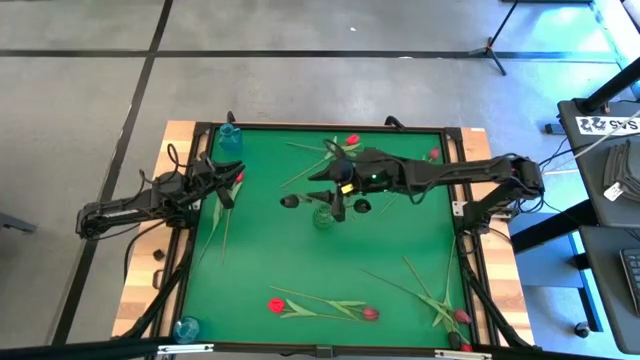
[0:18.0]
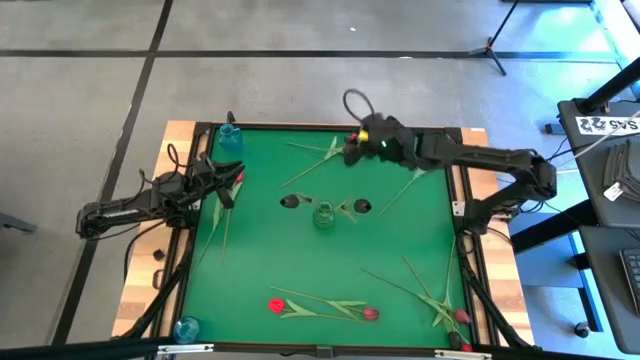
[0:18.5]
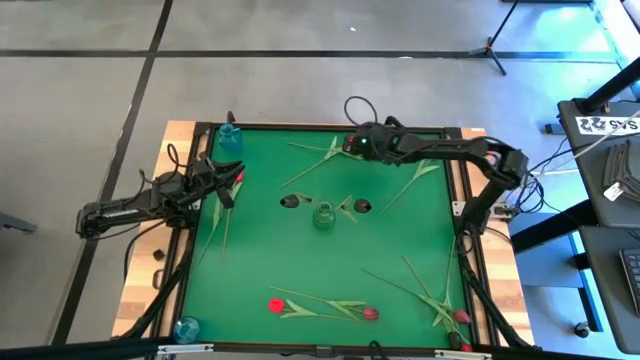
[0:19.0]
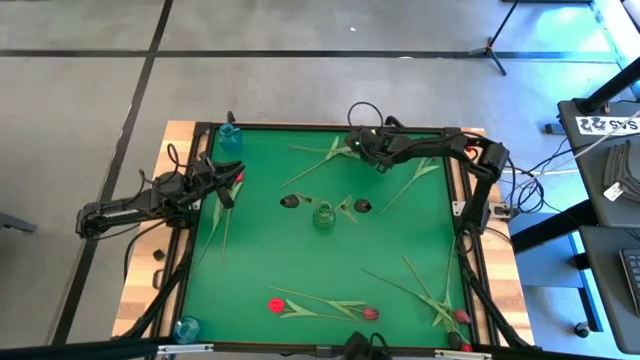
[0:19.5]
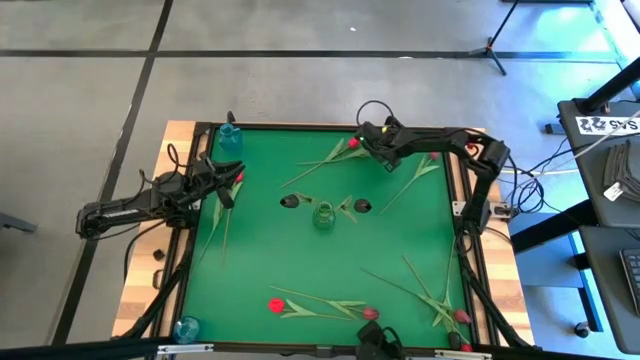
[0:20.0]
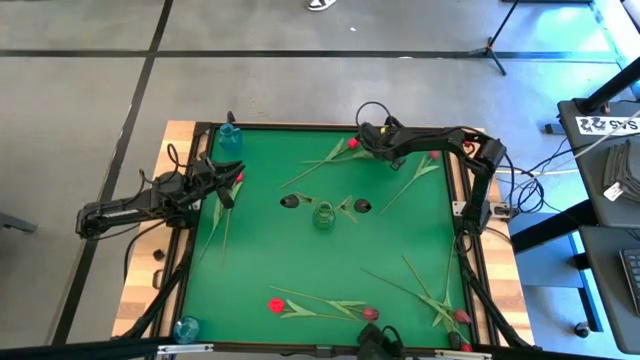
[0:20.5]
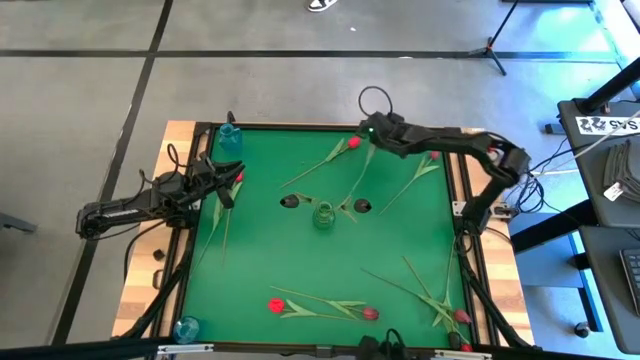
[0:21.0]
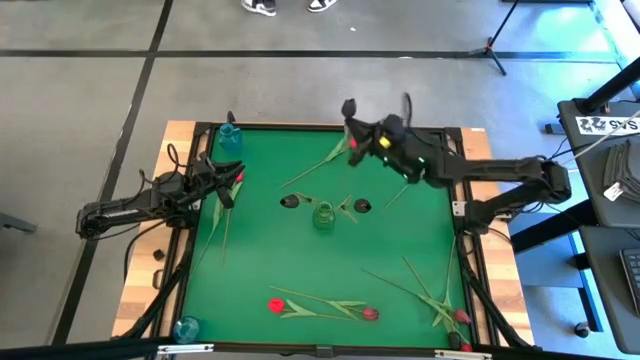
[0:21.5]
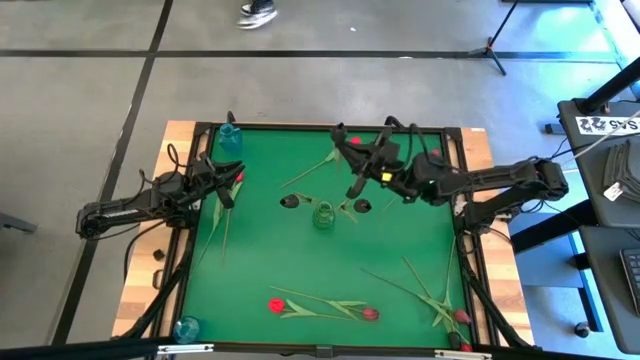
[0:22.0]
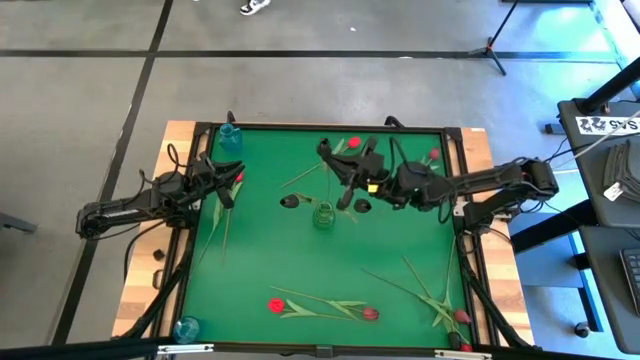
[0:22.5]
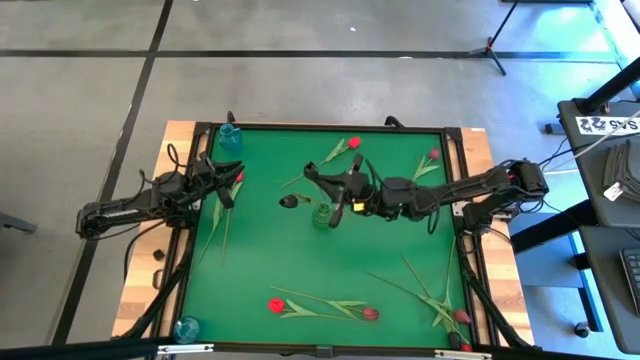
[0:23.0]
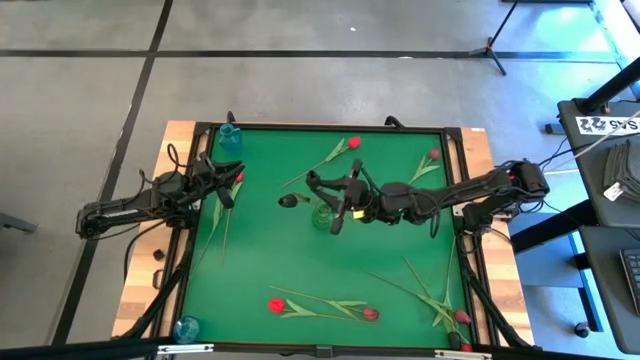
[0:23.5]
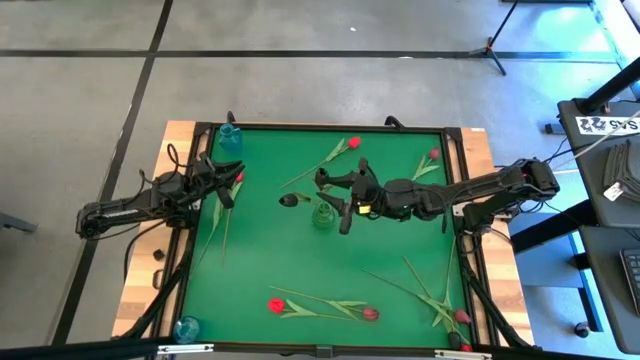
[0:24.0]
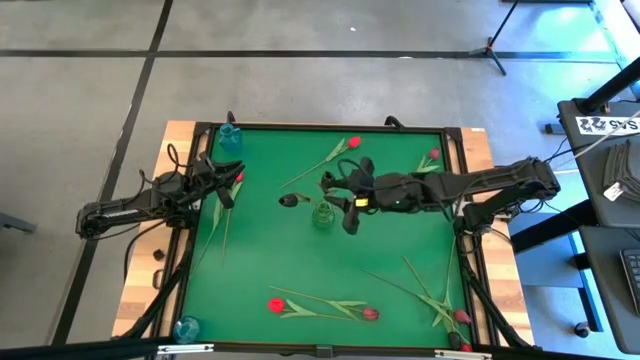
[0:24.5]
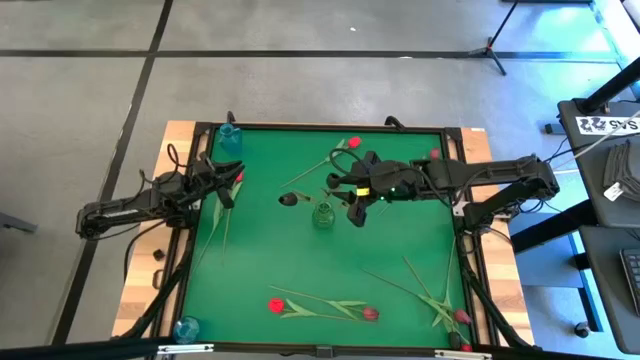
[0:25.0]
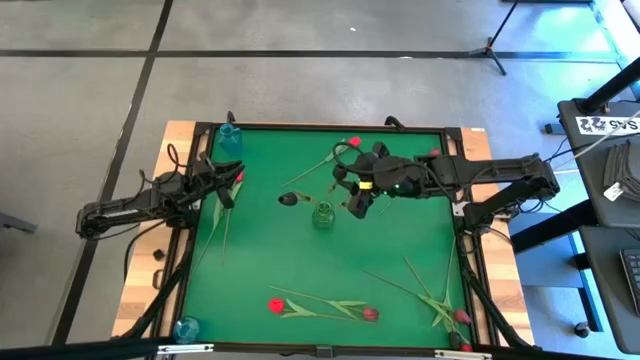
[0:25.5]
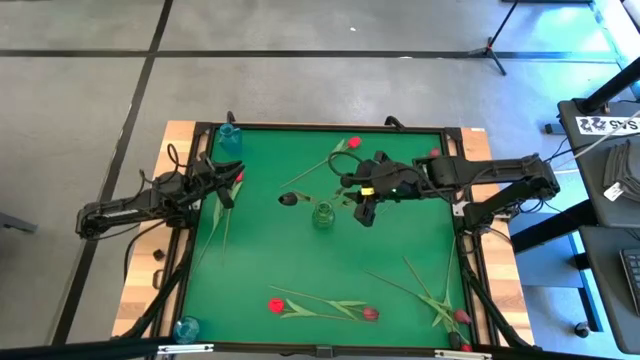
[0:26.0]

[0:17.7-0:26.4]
Task: Sort flowers into vase by color
Put the black tulip into the green vase

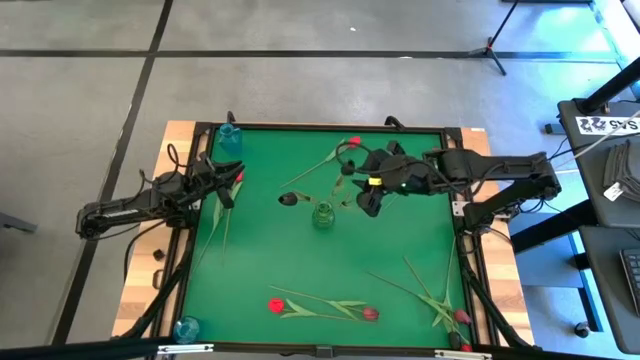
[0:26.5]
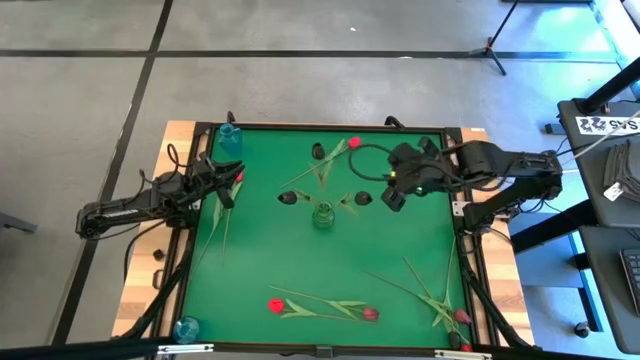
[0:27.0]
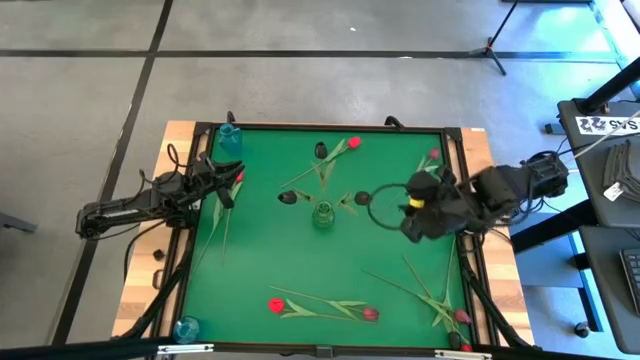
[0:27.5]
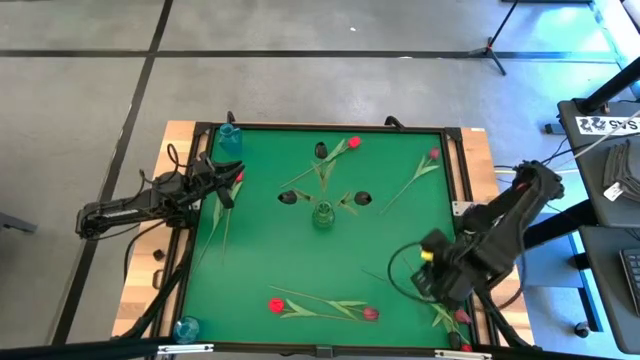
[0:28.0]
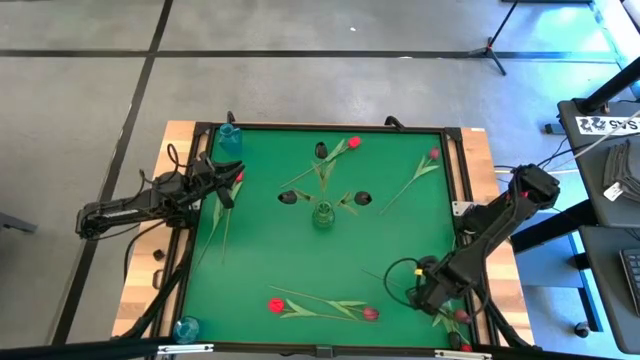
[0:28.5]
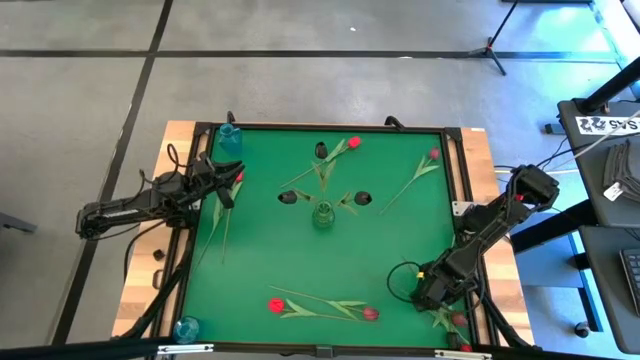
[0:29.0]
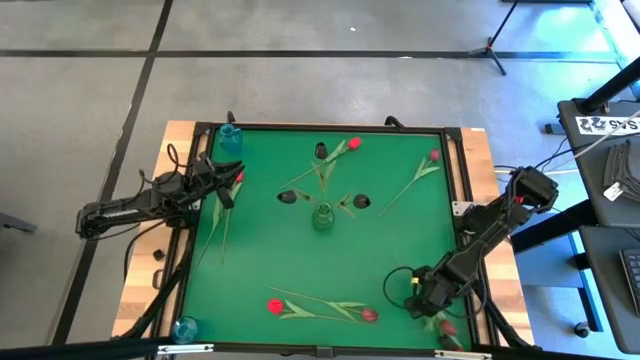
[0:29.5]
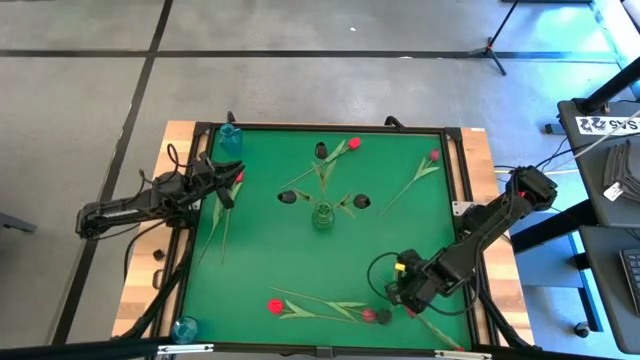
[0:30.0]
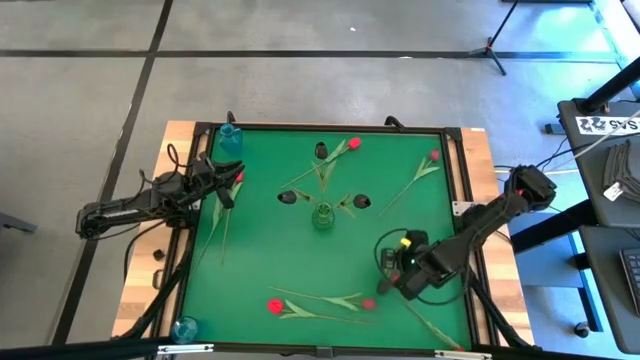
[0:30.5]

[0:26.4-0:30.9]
Put the black tulip into the green vase

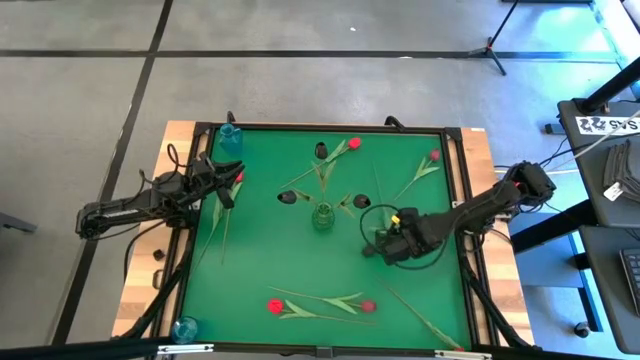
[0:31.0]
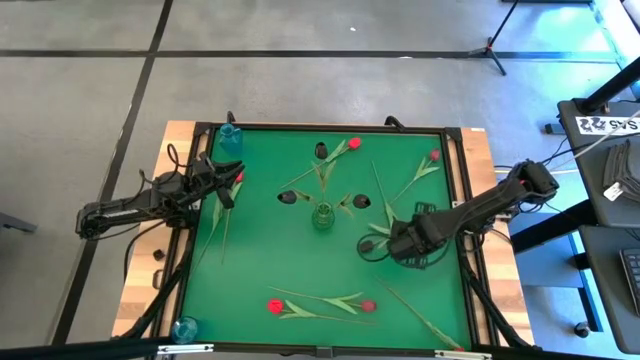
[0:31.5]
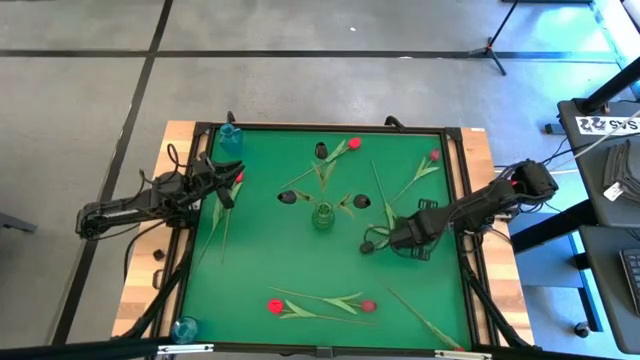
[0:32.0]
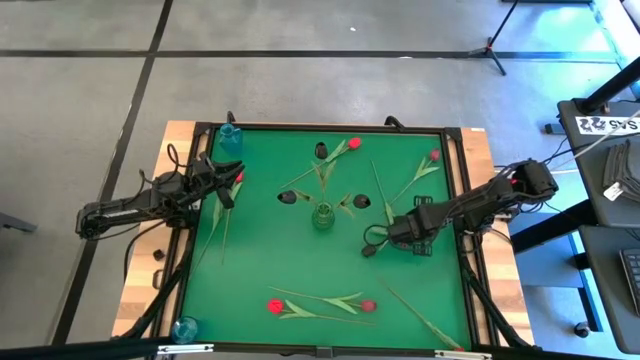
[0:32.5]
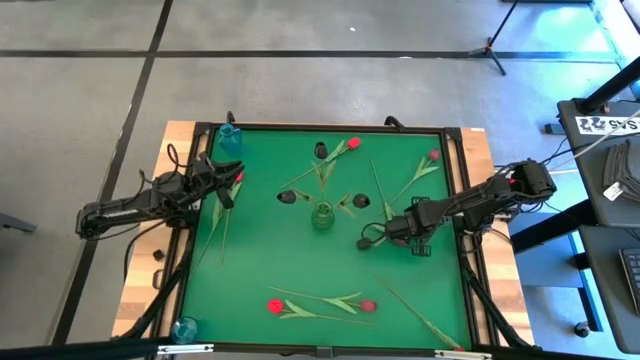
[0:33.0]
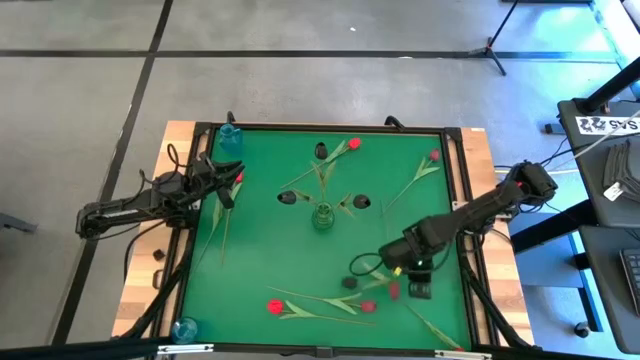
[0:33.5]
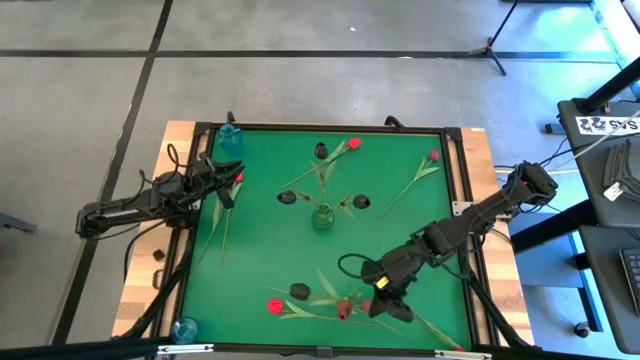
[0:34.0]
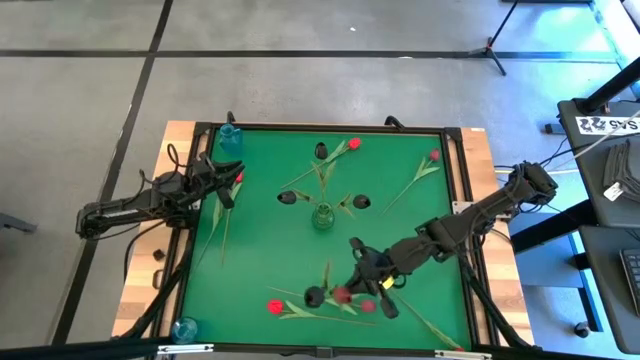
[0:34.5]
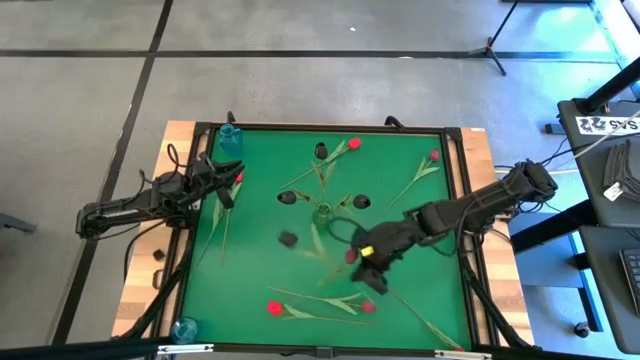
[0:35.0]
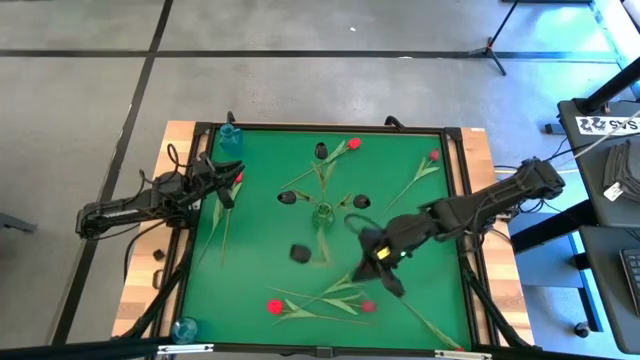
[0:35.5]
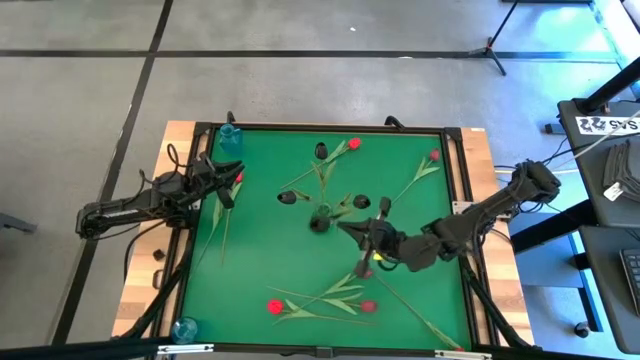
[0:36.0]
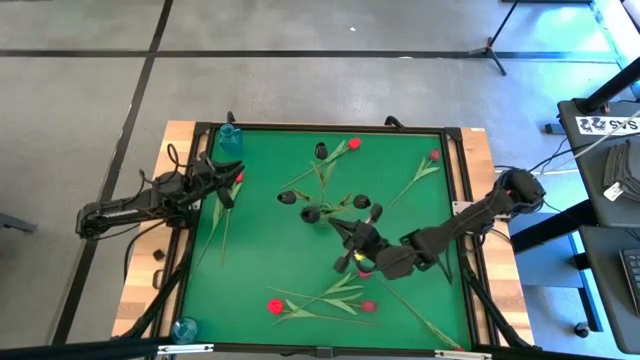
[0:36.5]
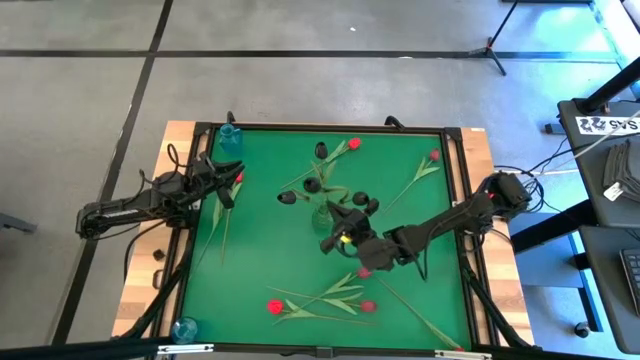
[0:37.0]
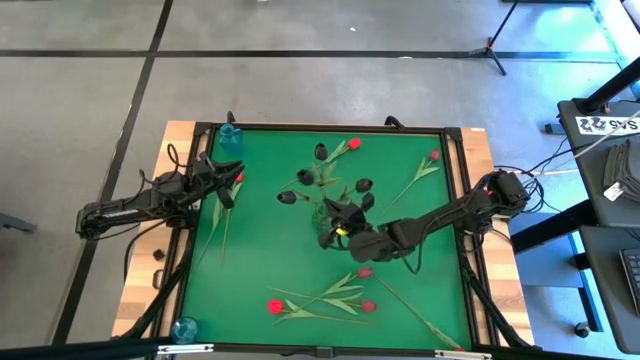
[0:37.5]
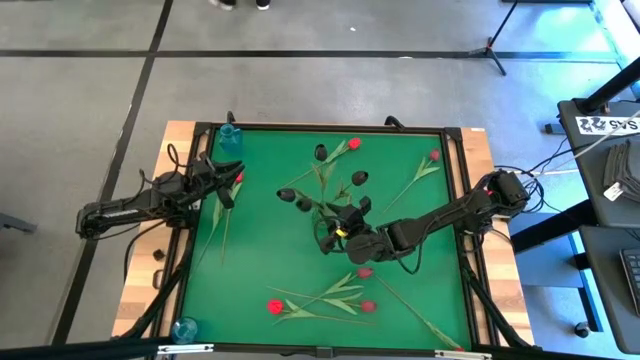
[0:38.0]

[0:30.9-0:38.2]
Put the black tulip into the green vase
